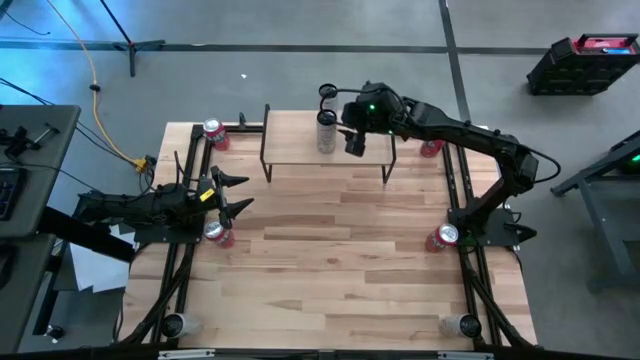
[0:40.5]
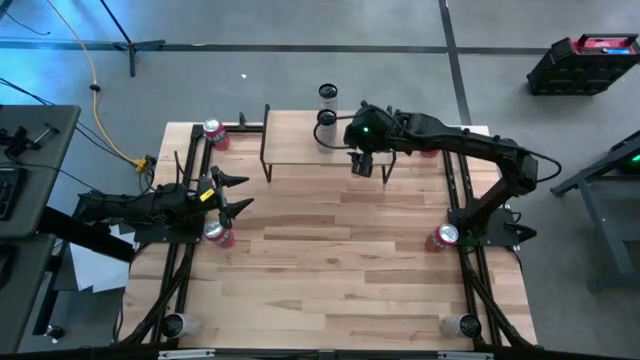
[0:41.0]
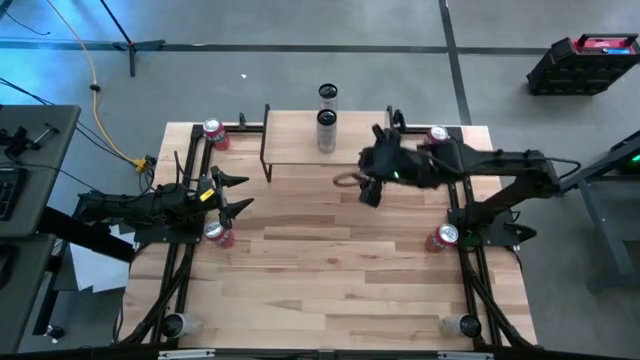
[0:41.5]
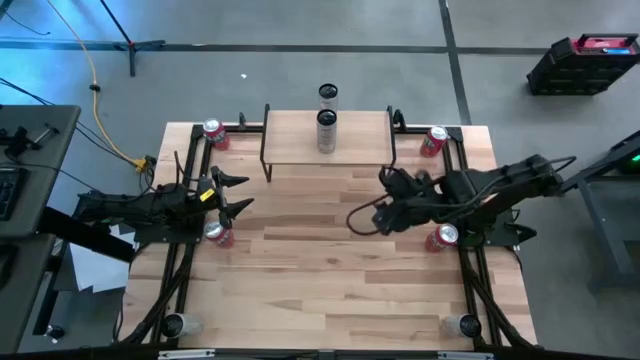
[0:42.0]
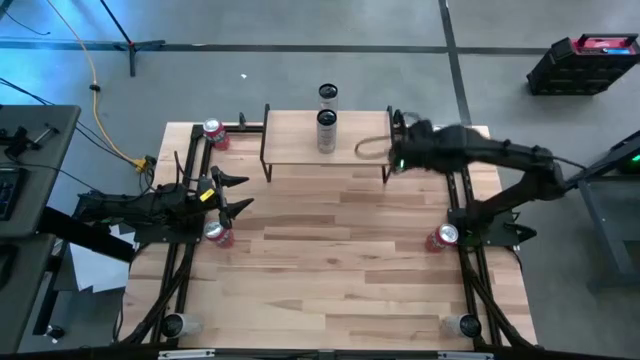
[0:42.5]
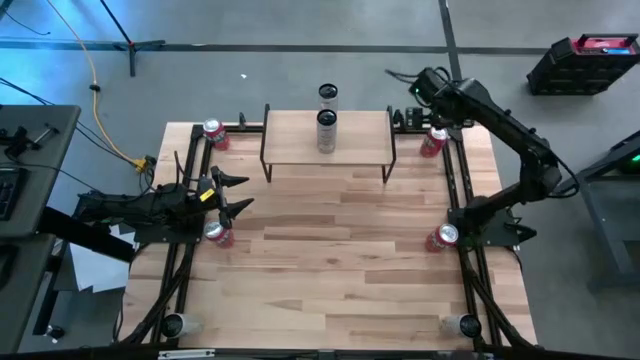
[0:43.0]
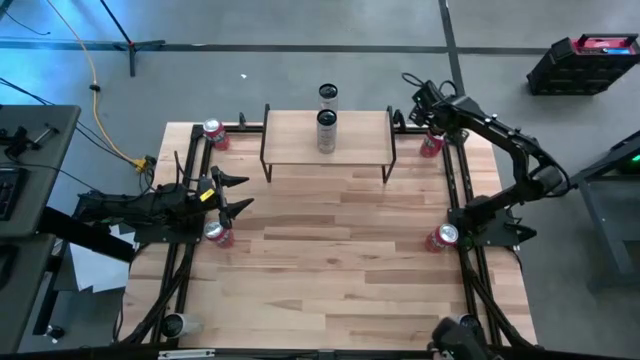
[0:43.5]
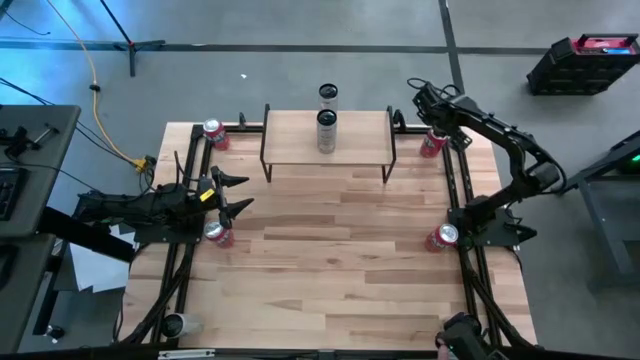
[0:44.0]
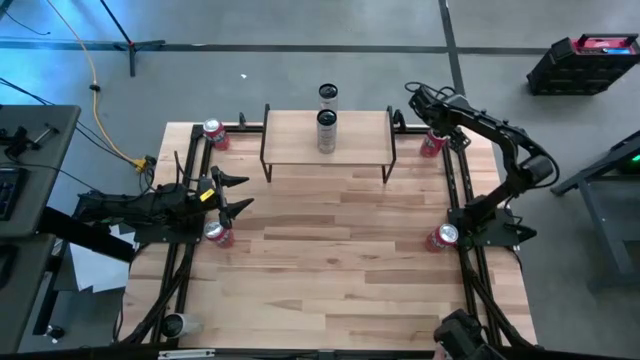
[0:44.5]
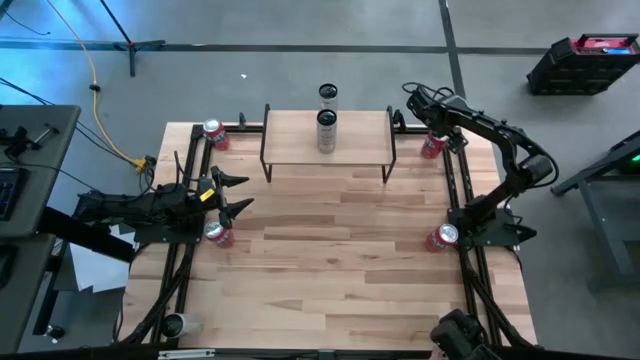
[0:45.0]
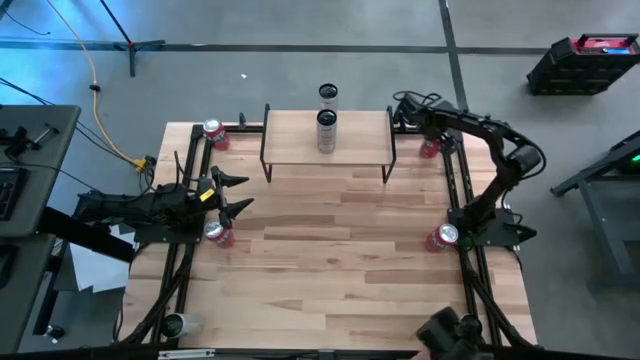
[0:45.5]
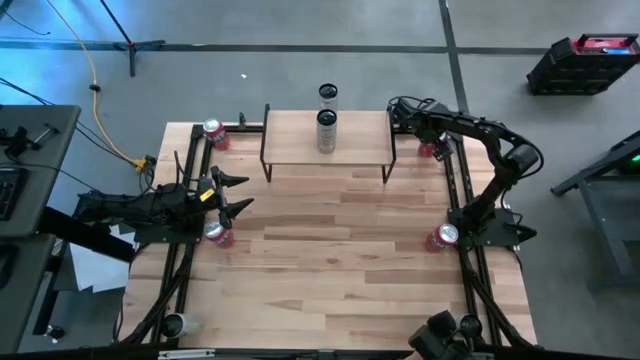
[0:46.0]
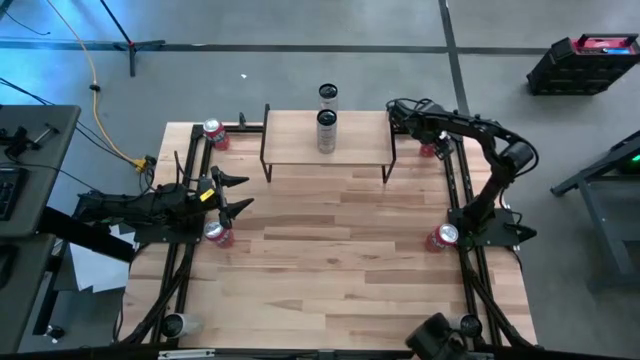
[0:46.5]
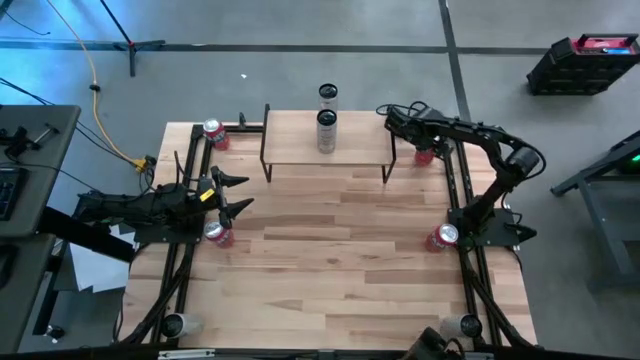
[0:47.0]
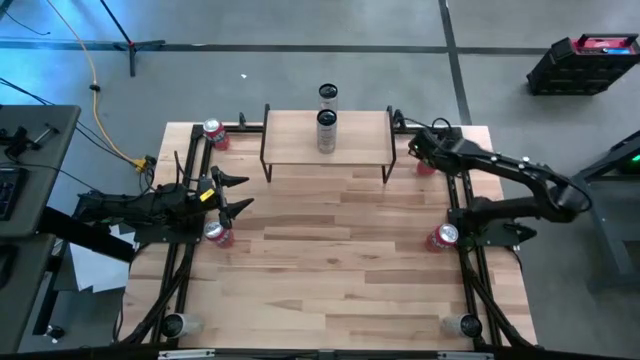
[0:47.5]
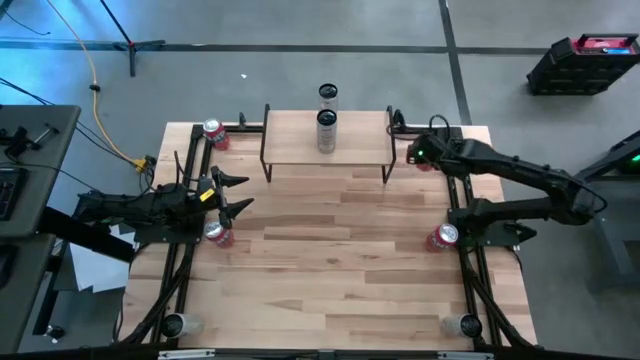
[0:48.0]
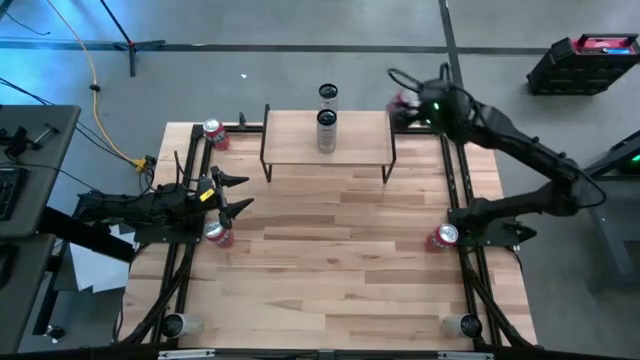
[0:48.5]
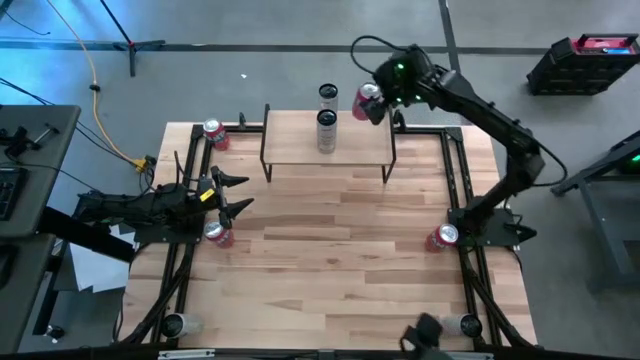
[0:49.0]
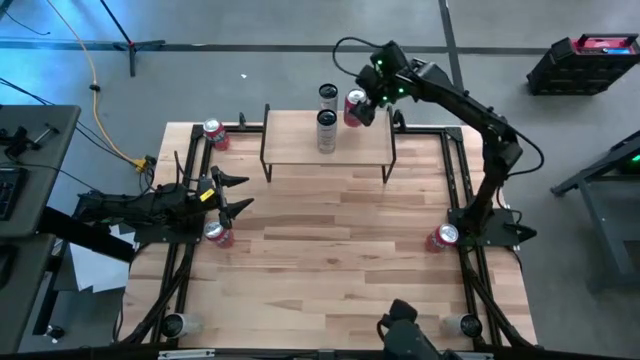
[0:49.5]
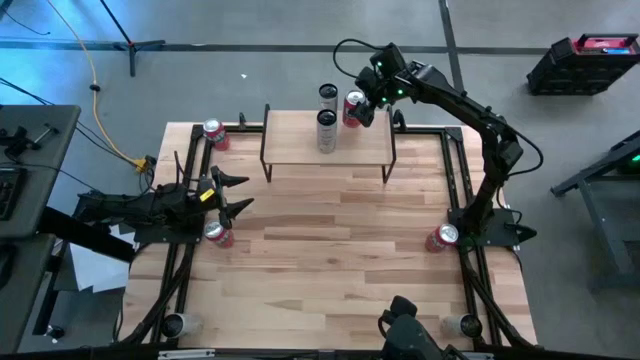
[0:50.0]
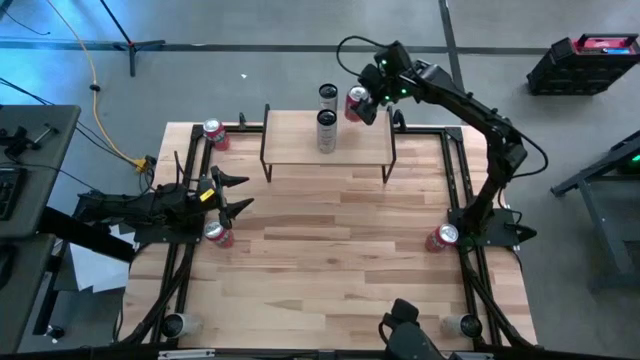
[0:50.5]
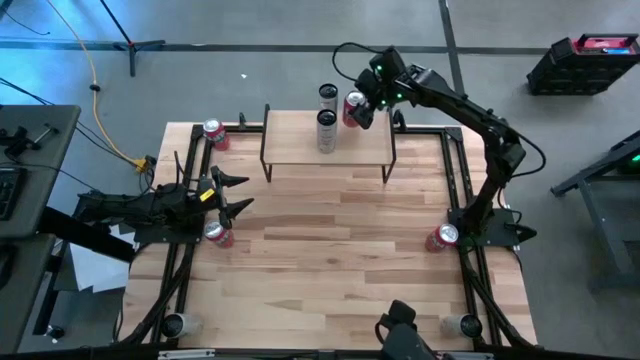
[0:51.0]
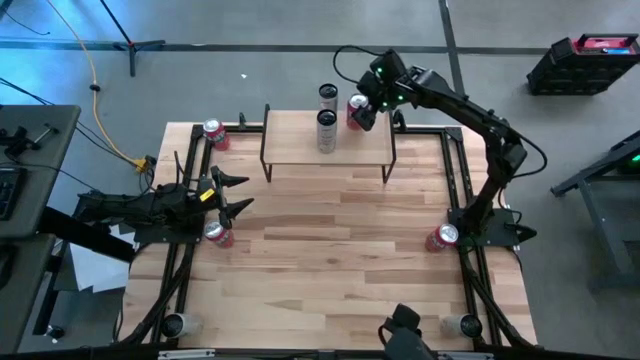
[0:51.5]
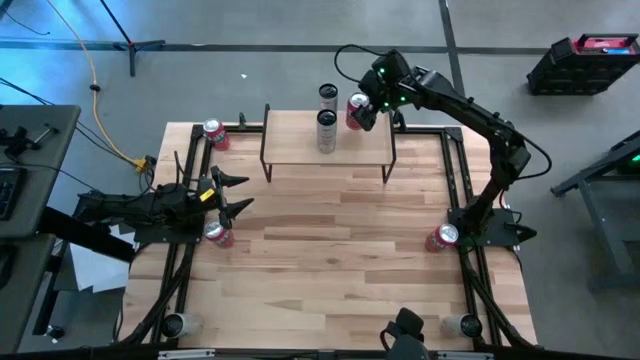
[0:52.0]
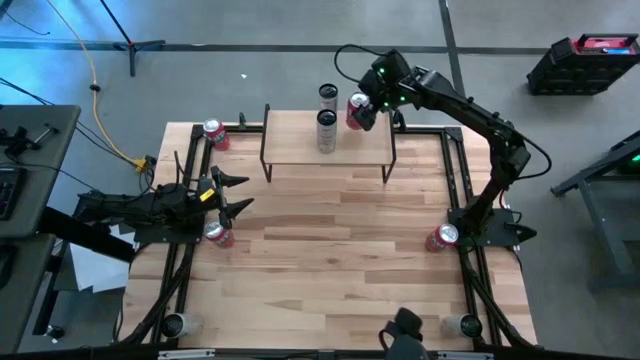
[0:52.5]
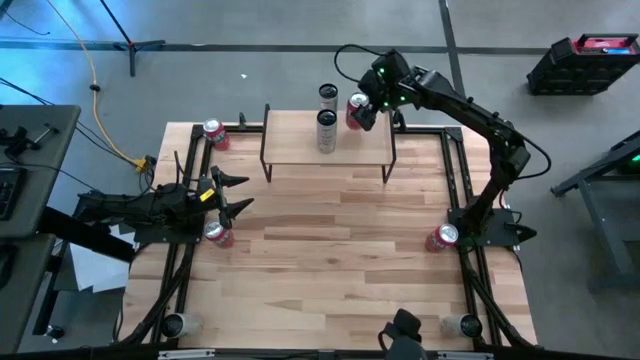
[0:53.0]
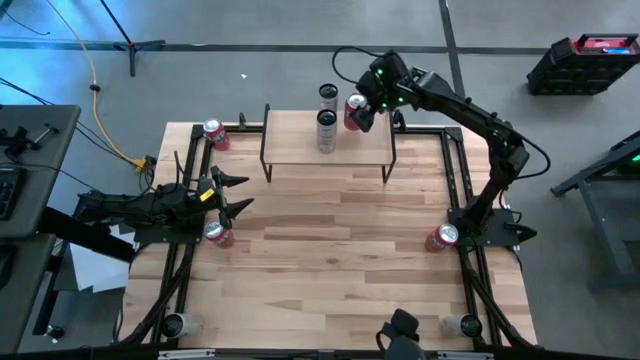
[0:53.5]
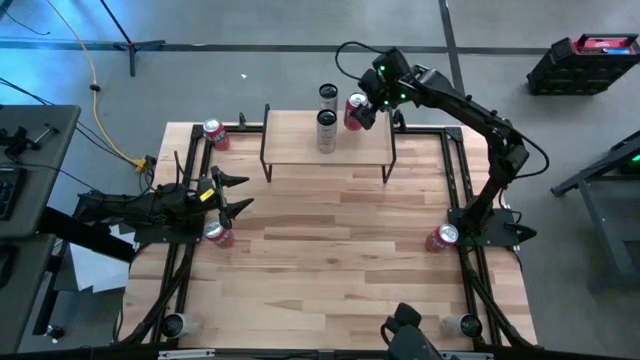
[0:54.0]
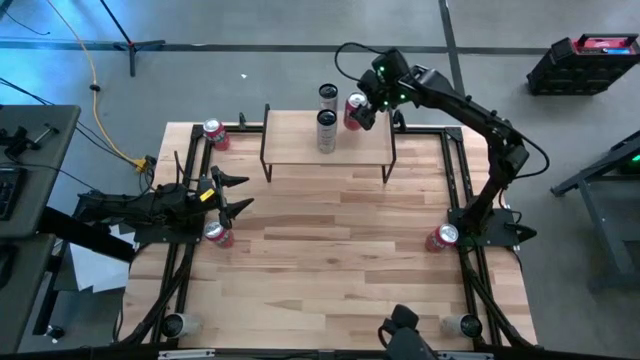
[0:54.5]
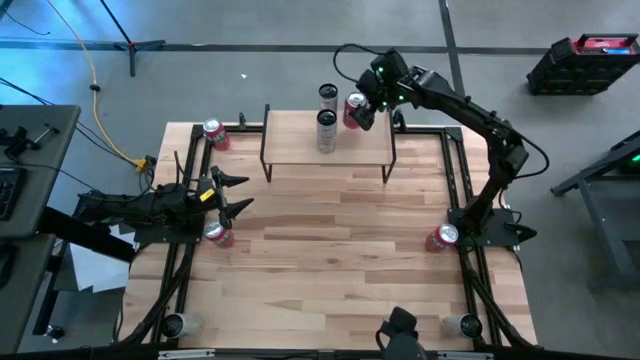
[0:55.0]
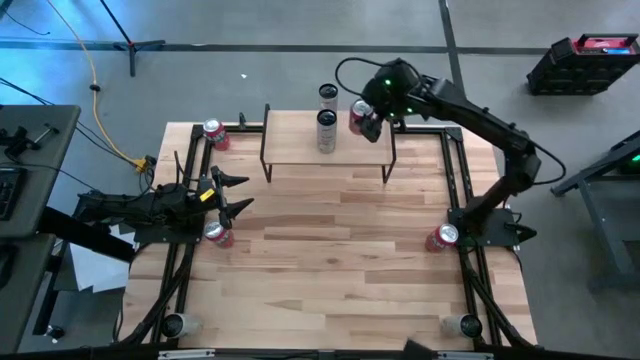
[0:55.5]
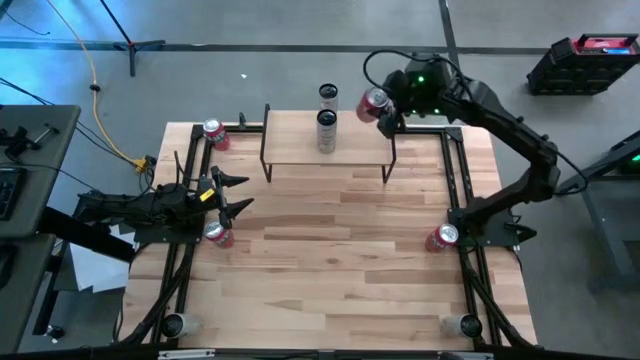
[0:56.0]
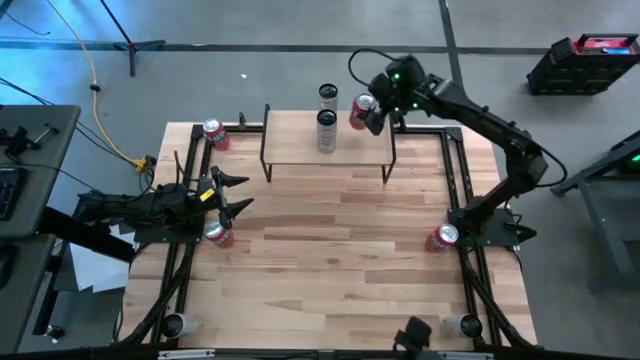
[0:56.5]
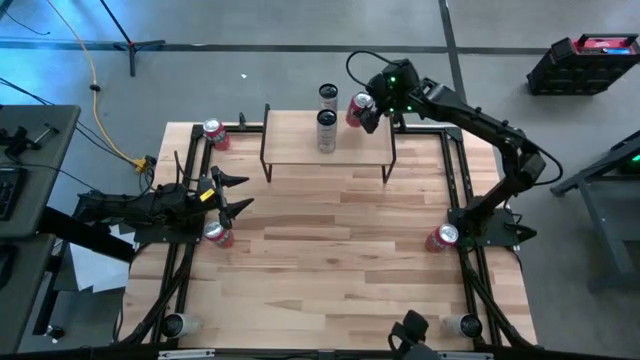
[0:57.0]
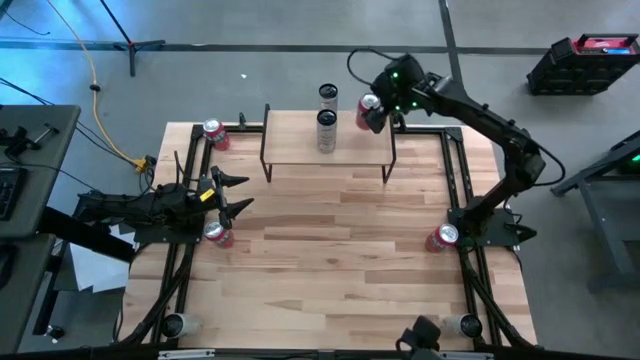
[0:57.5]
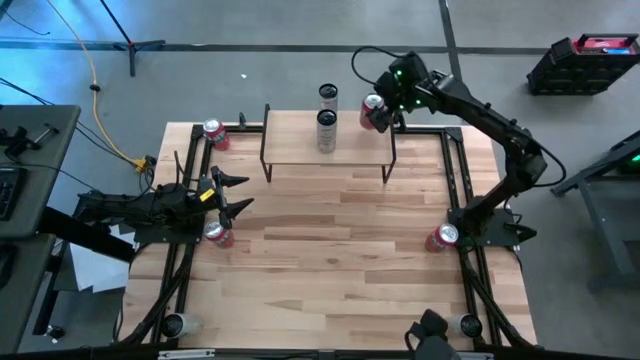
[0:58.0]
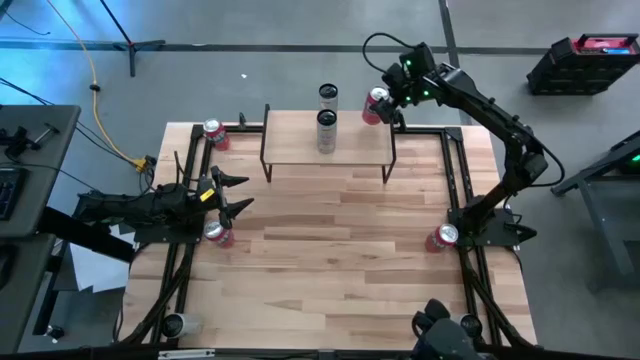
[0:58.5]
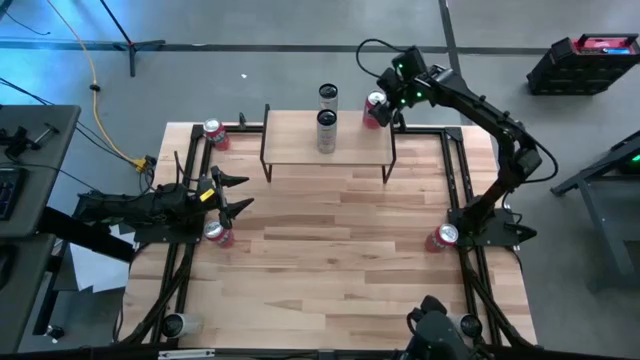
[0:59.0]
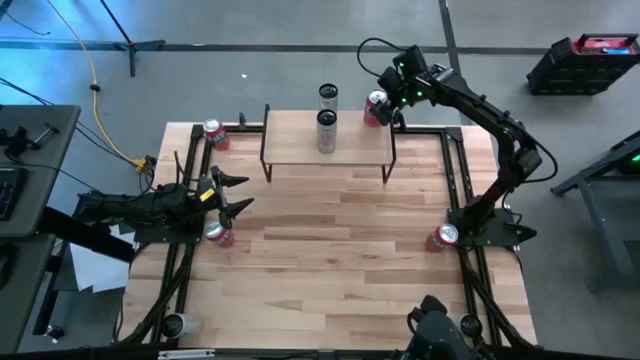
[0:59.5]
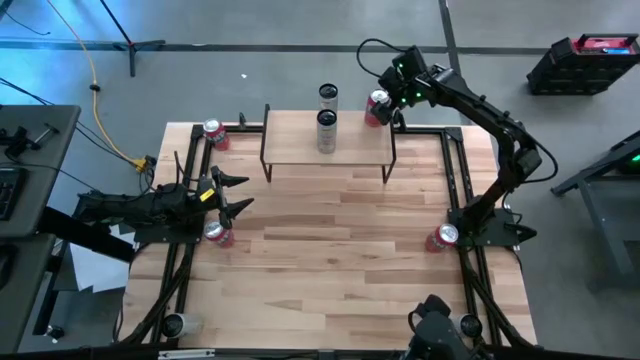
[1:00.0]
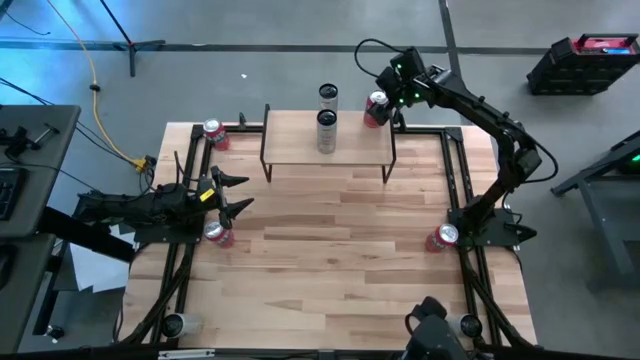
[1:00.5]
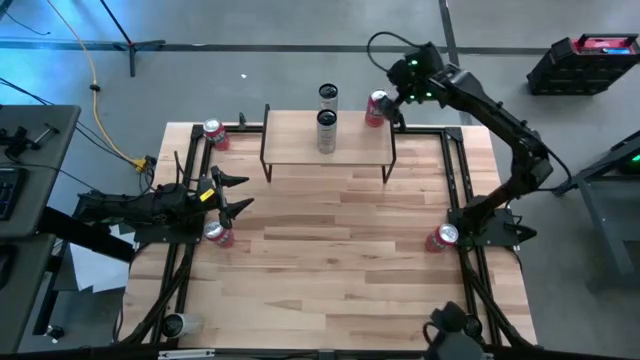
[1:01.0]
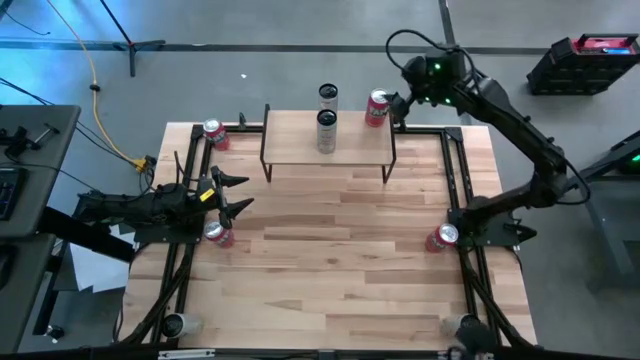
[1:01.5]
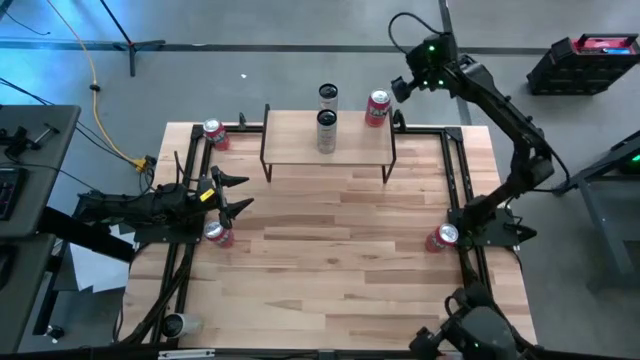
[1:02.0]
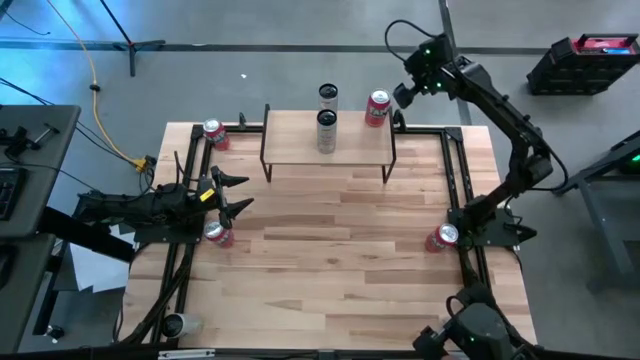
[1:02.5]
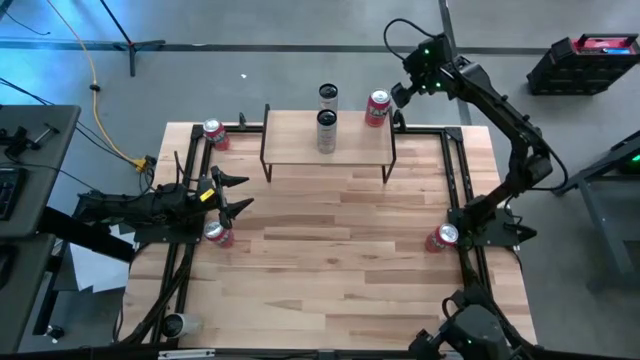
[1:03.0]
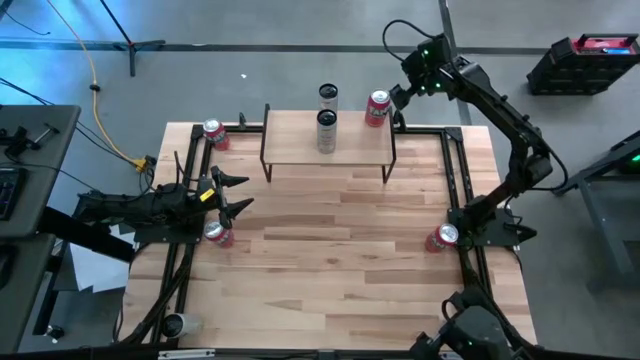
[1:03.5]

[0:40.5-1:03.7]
Task: Place canned beverage on shelf
Put the top right red soda can on the shelf
